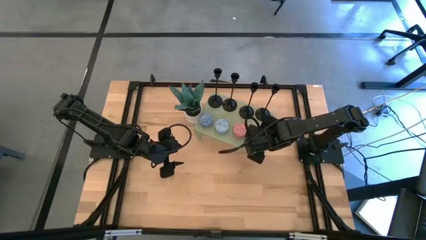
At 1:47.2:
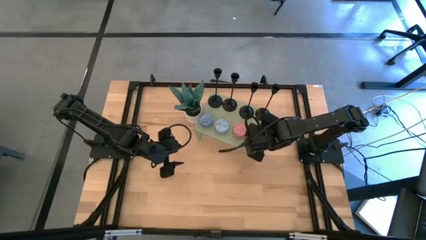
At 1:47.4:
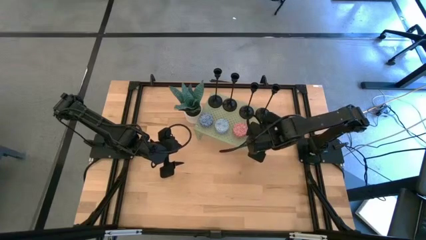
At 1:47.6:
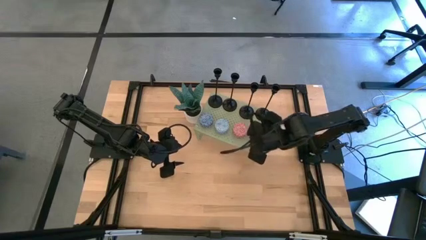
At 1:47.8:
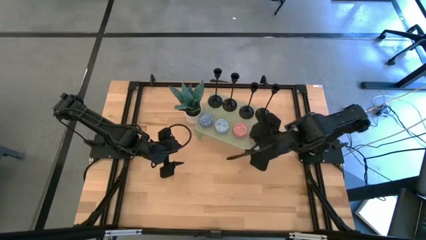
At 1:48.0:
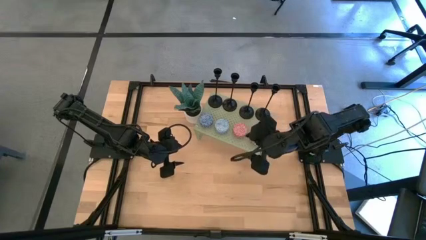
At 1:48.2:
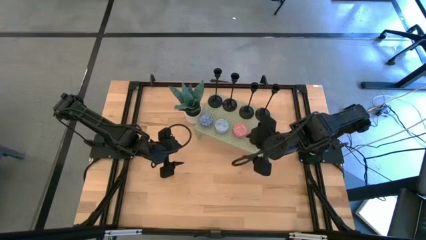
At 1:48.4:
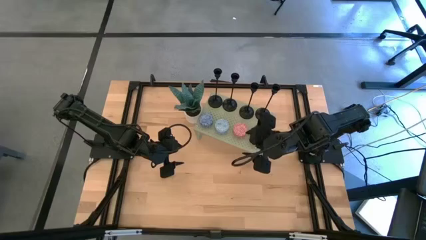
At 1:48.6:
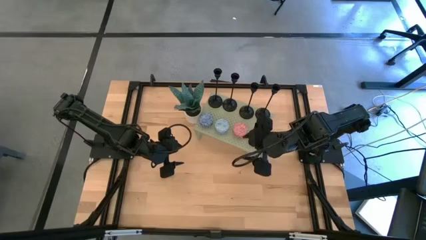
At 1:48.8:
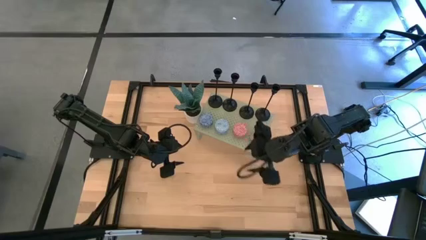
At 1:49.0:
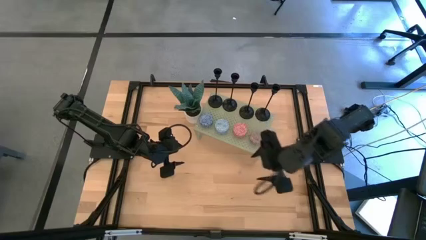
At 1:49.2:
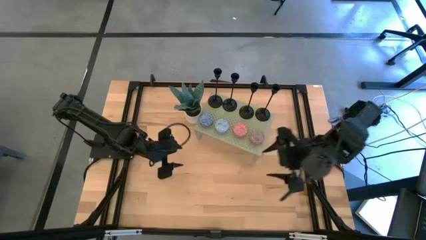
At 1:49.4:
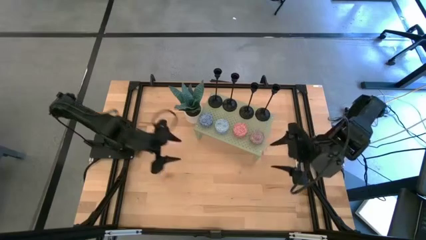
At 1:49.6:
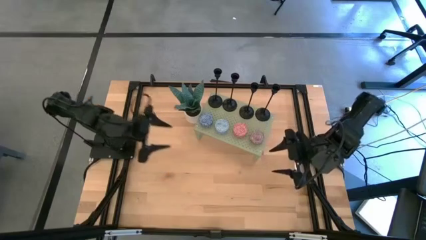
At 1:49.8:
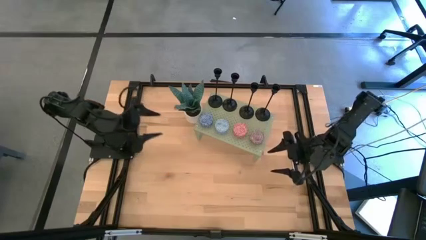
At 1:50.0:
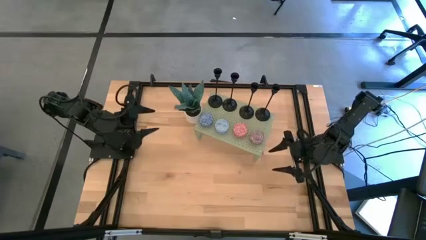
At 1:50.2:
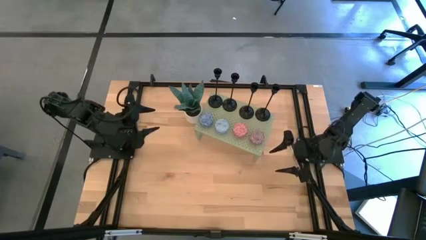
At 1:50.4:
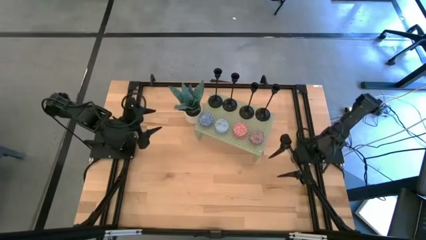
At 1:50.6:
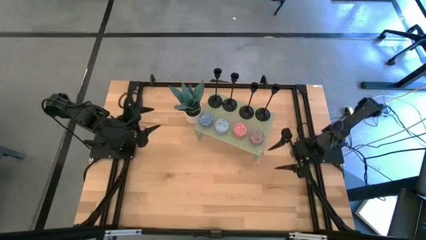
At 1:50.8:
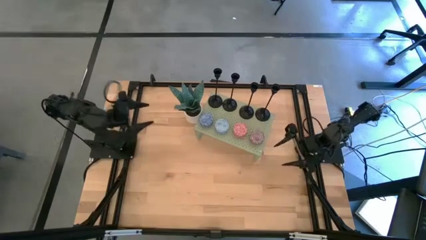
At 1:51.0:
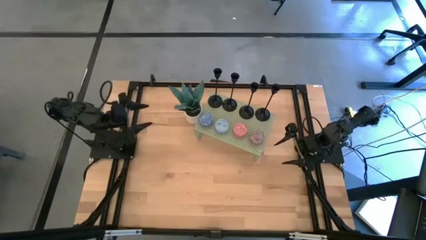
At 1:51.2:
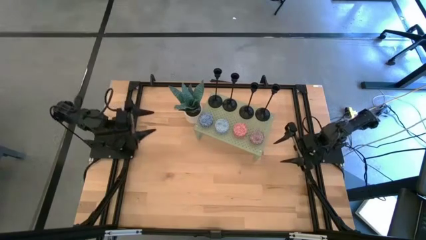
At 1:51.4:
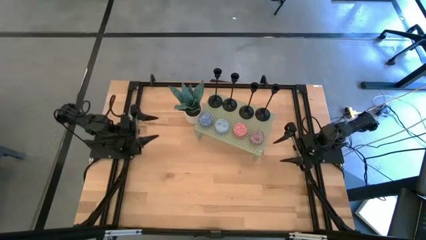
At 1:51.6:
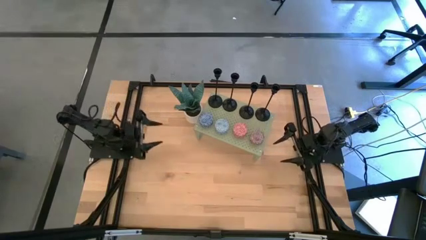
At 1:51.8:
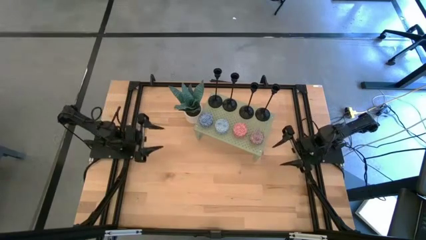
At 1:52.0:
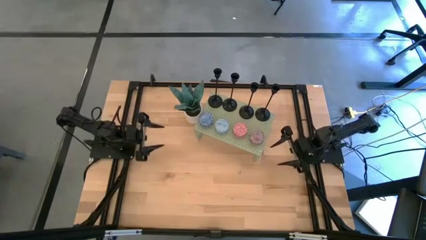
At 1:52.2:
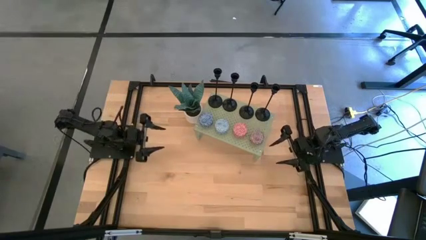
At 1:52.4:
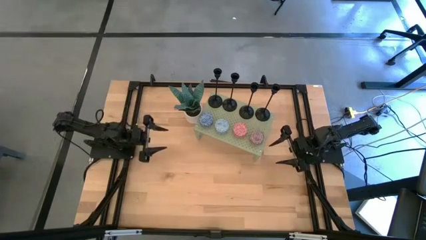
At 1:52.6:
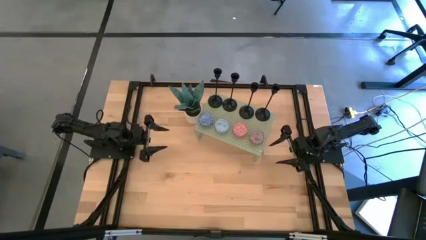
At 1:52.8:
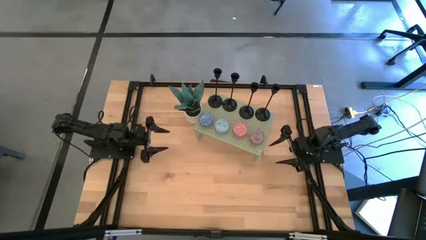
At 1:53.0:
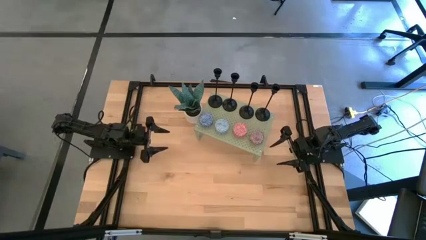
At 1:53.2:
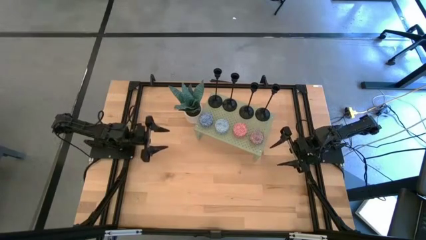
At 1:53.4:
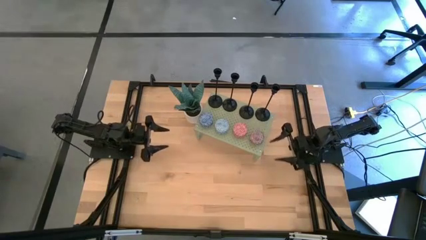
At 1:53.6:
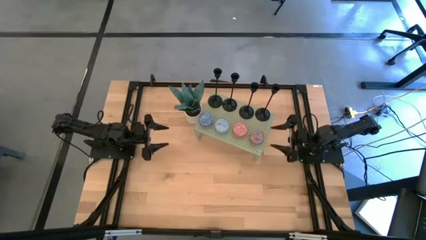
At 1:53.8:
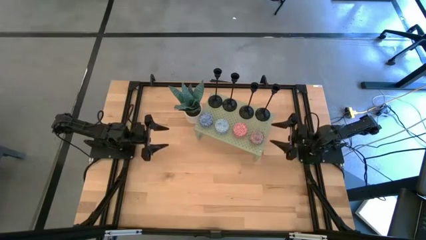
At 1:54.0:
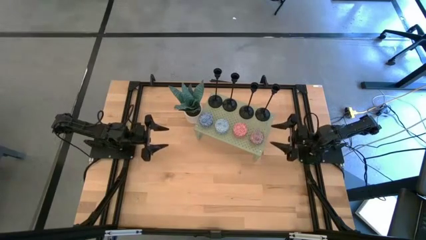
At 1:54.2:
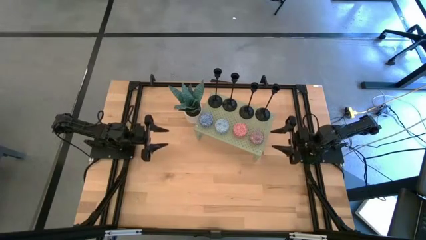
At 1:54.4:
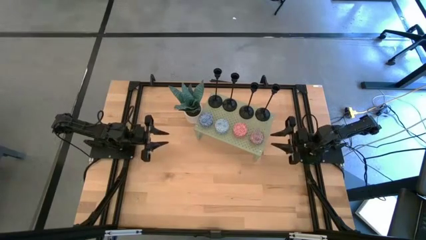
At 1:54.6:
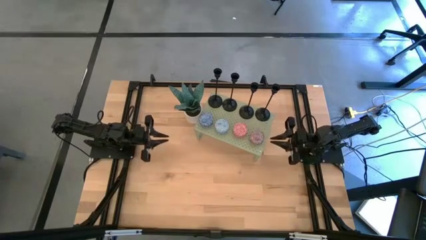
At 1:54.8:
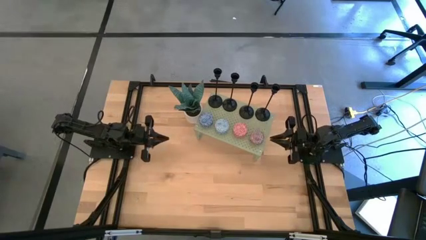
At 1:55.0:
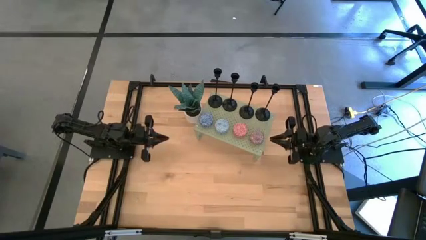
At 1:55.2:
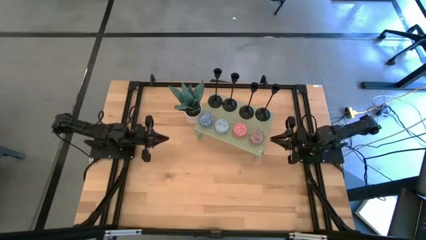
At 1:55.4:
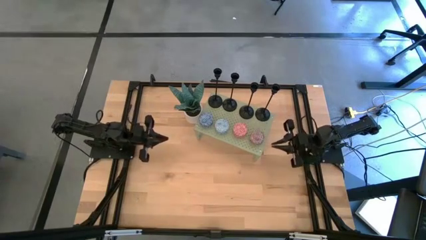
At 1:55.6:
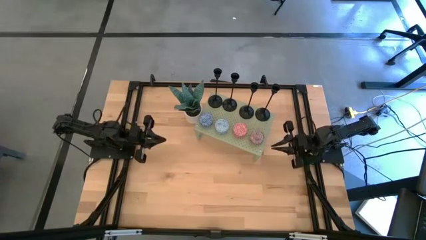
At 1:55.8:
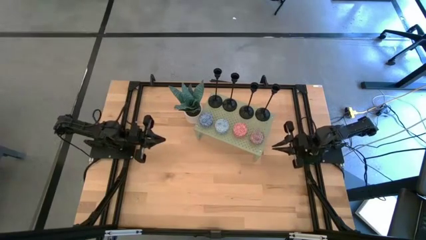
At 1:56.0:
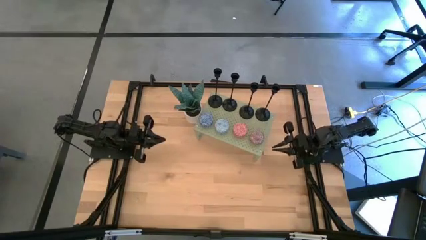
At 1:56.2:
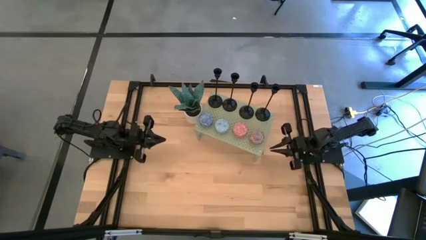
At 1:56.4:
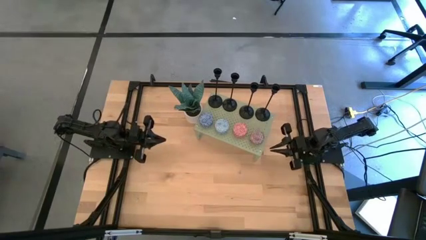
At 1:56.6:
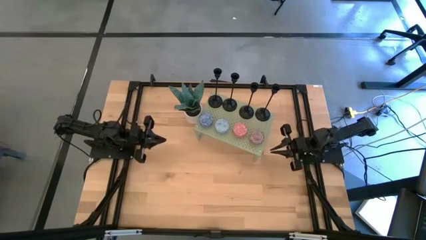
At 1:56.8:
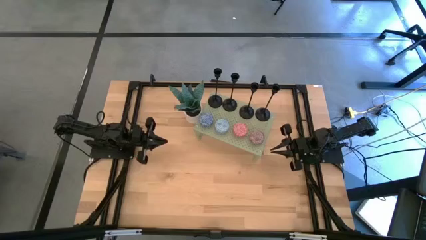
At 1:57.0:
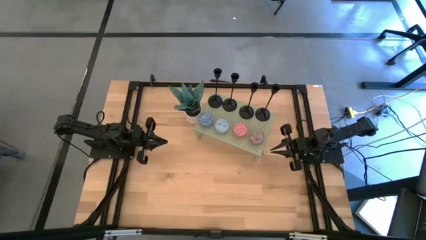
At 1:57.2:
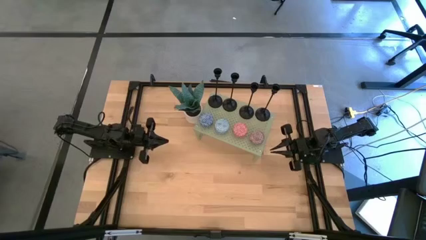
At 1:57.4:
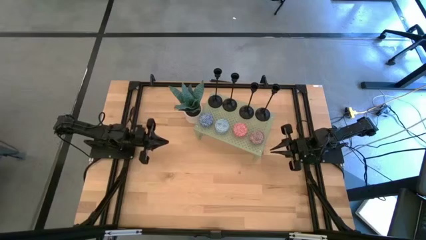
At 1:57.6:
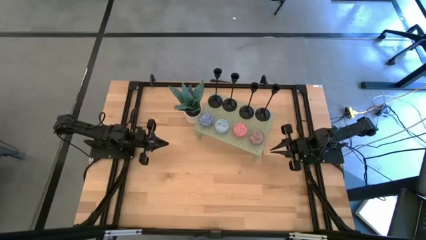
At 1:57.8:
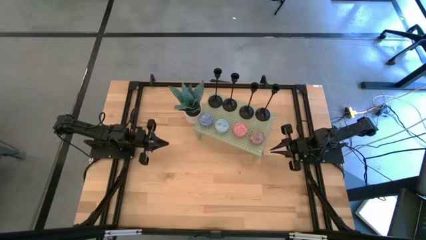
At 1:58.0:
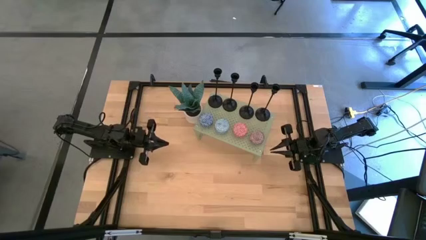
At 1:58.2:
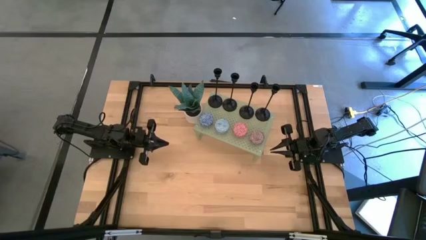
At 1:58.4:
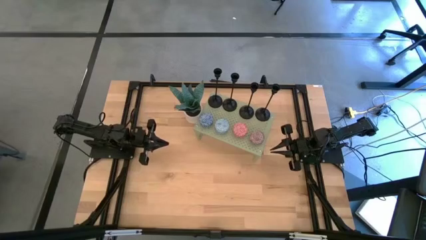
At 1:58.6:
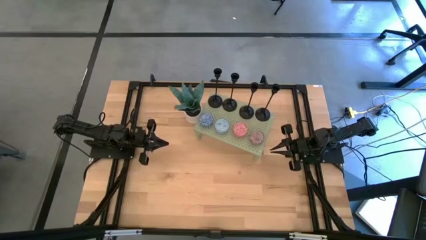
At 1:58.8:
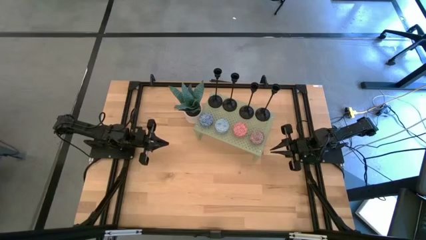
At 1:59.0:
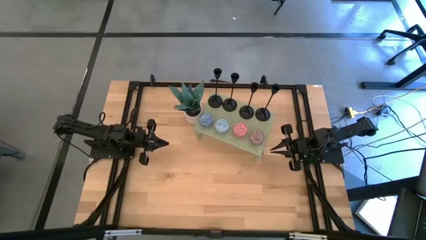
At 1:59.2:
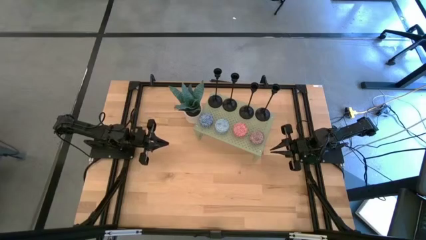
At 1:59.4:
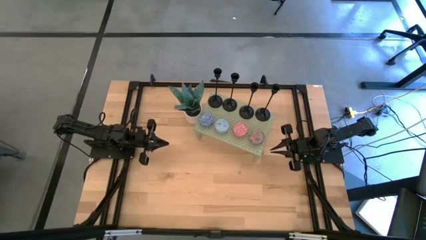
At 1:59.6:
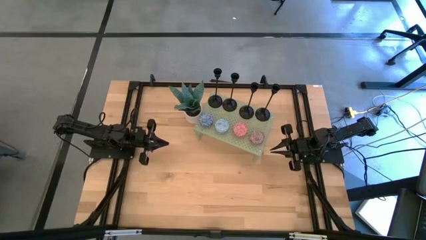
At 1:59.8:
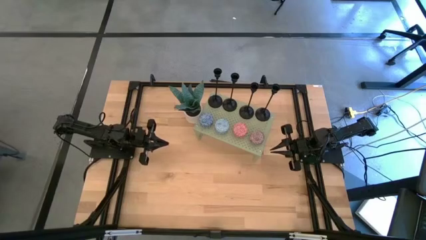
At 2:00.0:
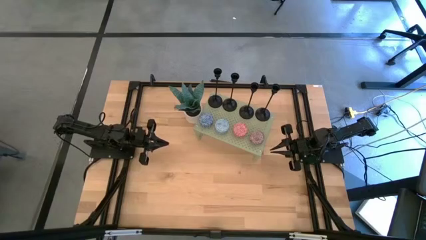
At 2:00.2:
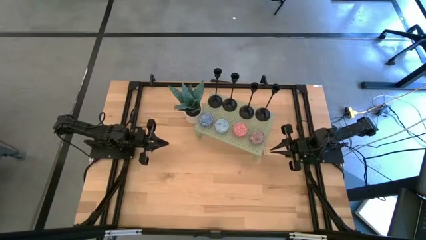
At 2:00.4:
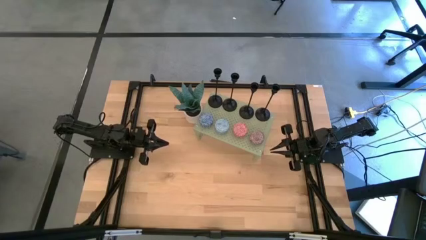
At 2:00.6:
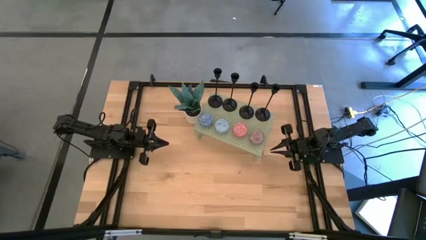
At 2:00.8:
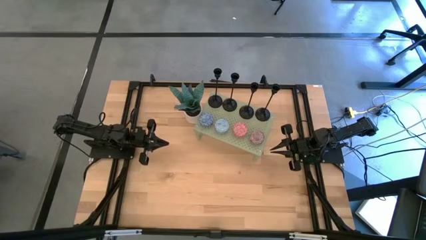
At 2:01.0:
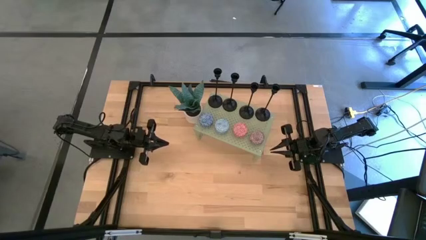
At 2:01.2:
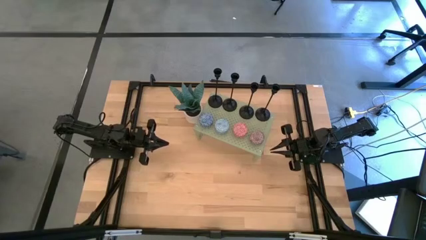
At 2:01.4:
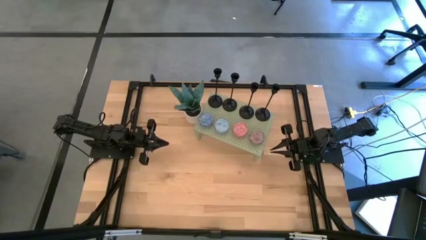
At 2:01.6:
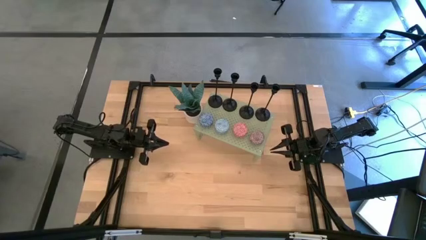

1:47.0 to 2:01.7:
Task: Stock candles and holders on shelf
Return to Home Position
